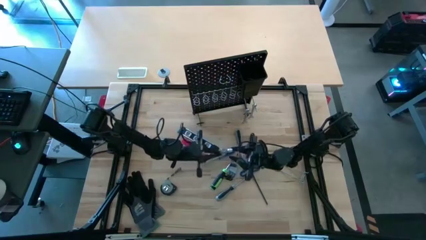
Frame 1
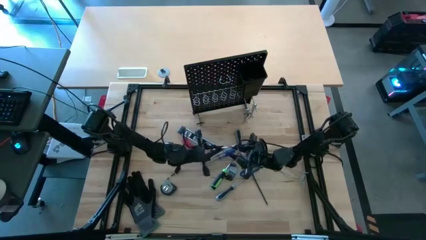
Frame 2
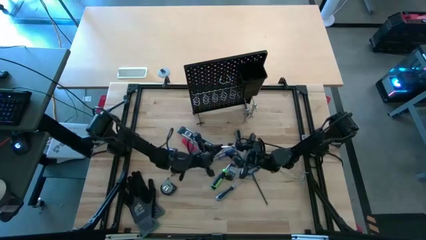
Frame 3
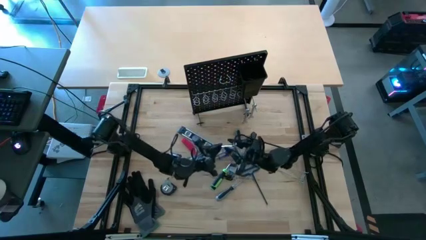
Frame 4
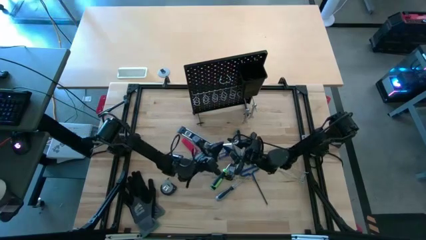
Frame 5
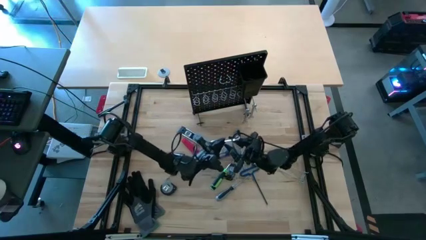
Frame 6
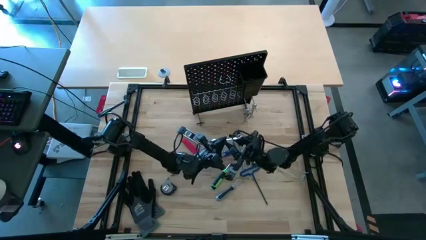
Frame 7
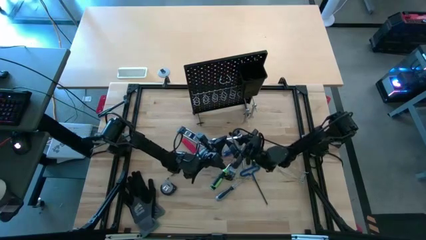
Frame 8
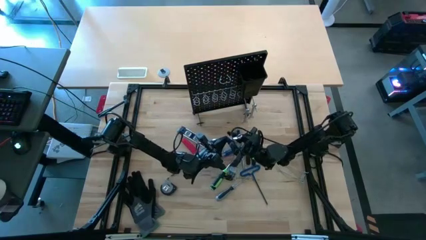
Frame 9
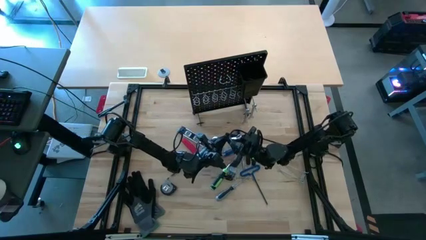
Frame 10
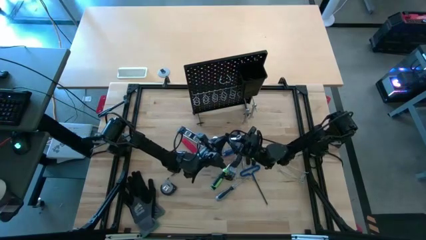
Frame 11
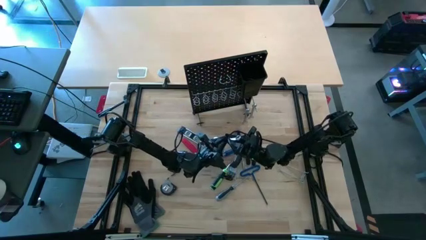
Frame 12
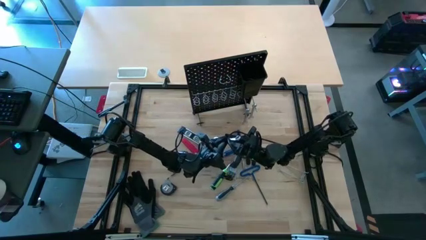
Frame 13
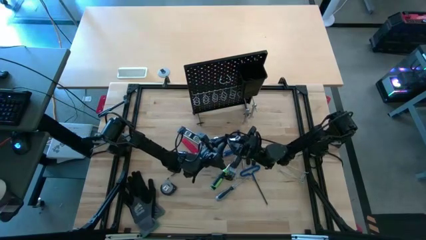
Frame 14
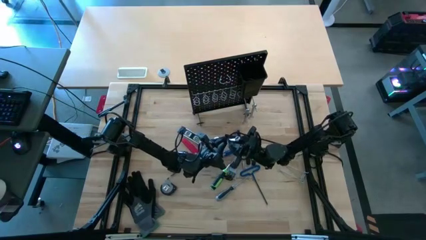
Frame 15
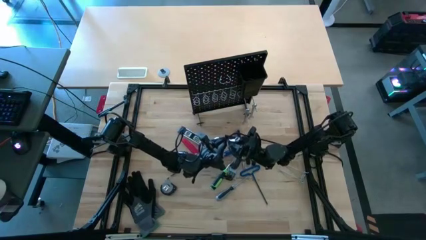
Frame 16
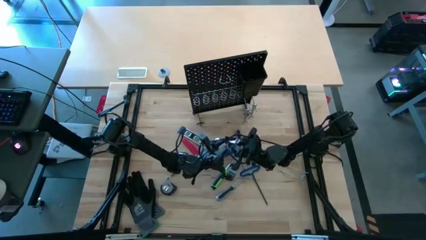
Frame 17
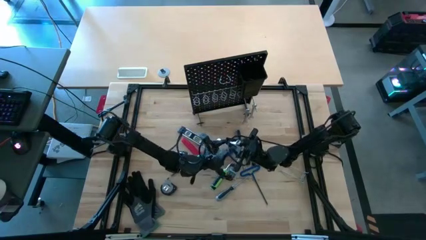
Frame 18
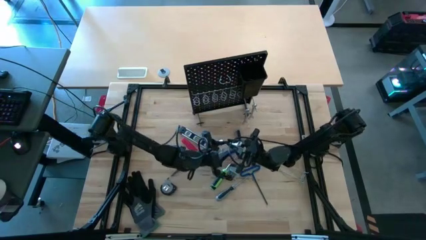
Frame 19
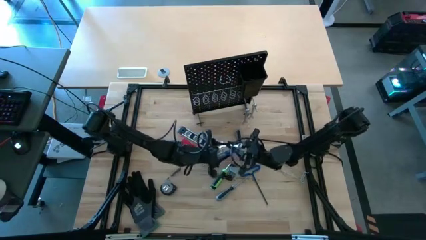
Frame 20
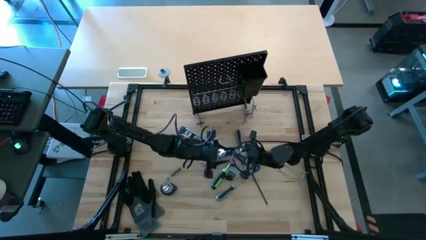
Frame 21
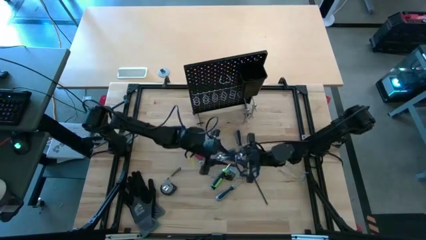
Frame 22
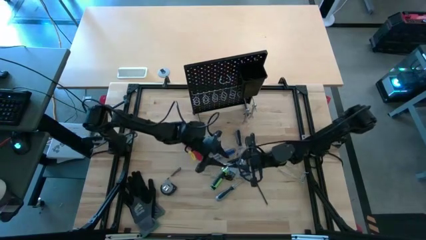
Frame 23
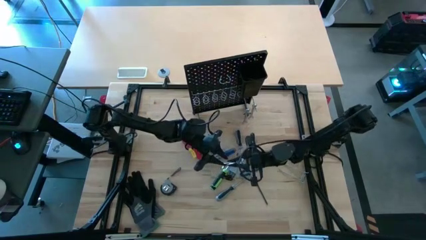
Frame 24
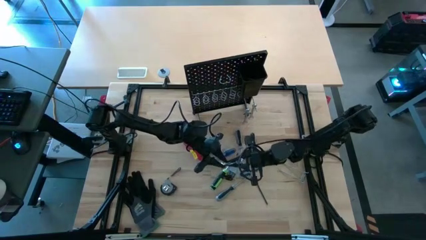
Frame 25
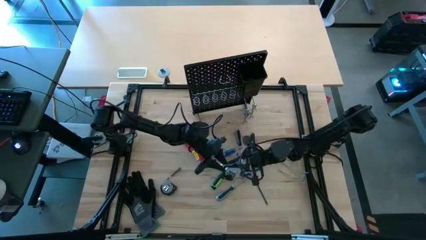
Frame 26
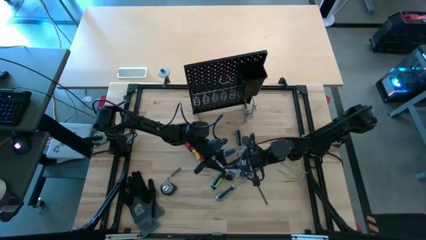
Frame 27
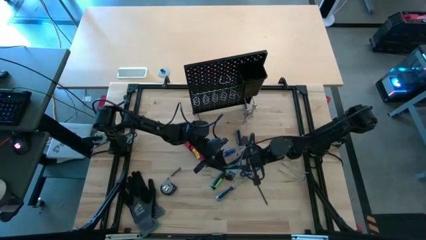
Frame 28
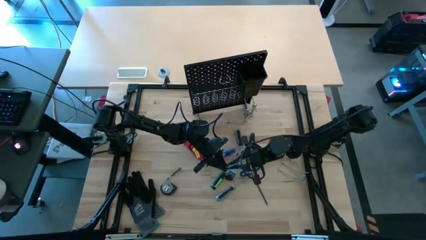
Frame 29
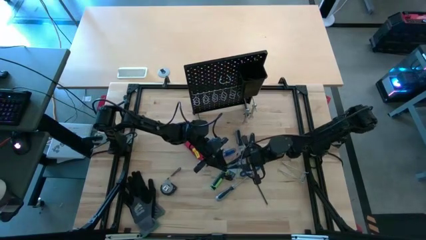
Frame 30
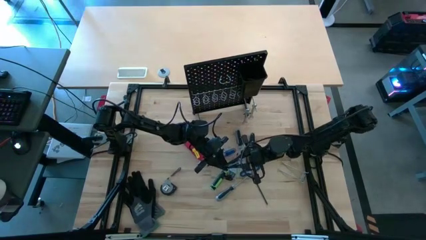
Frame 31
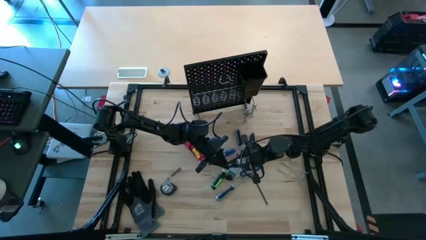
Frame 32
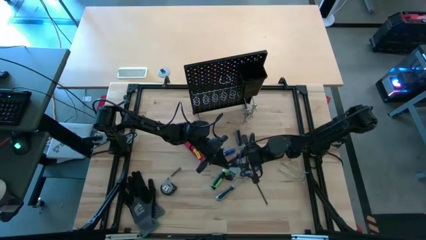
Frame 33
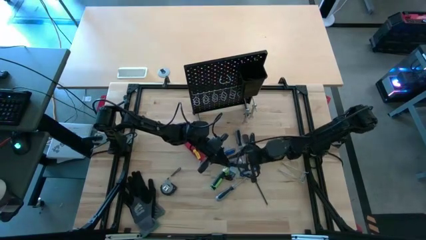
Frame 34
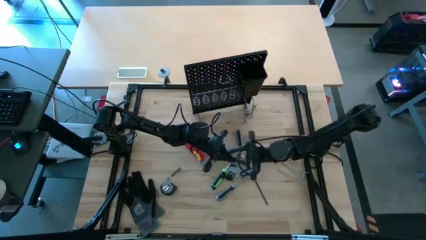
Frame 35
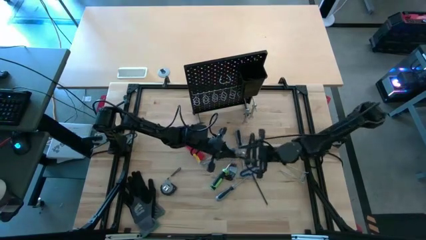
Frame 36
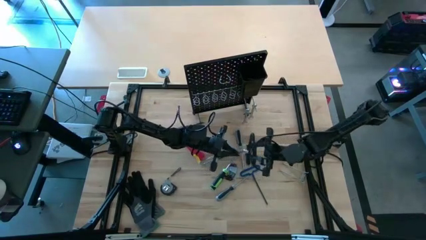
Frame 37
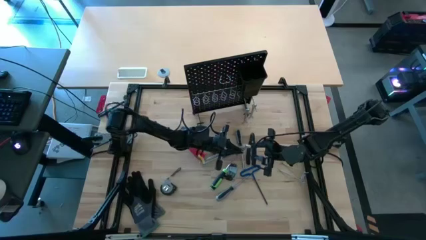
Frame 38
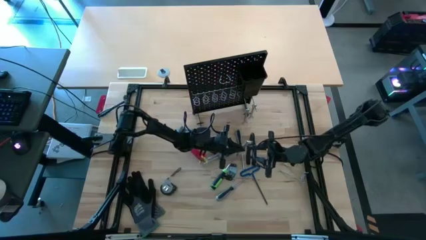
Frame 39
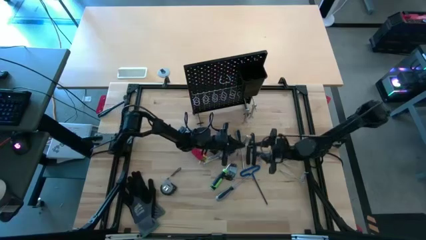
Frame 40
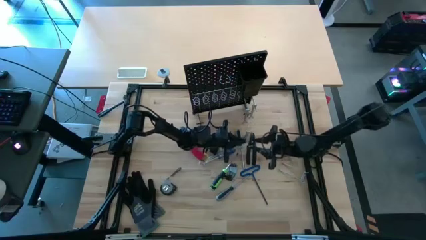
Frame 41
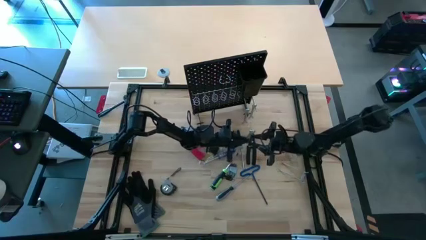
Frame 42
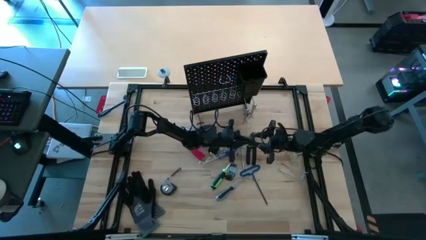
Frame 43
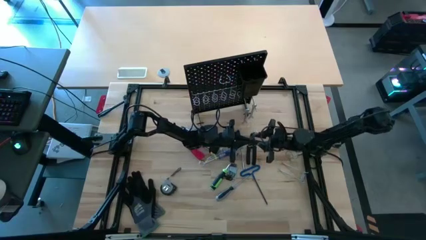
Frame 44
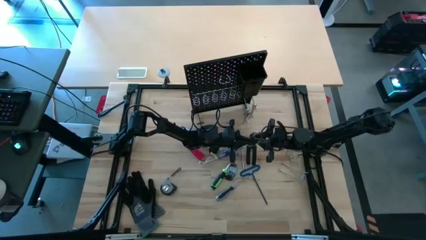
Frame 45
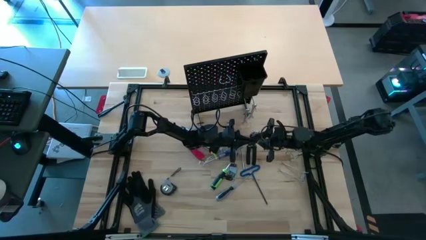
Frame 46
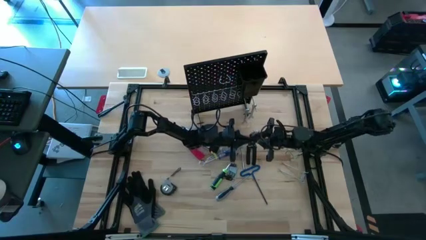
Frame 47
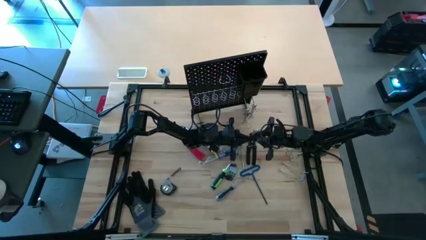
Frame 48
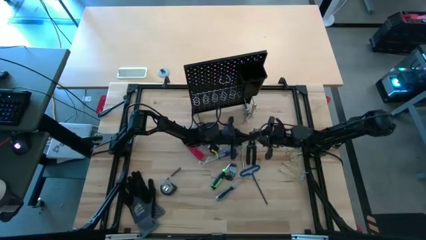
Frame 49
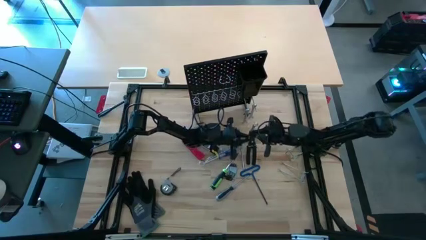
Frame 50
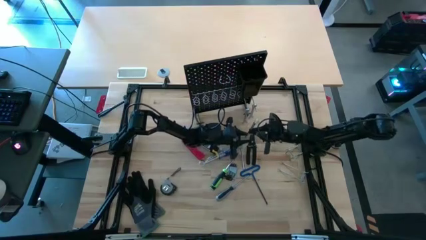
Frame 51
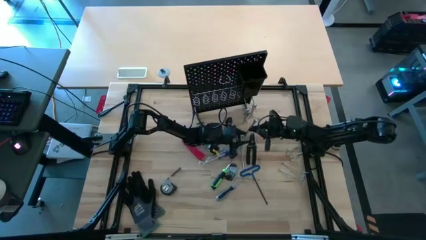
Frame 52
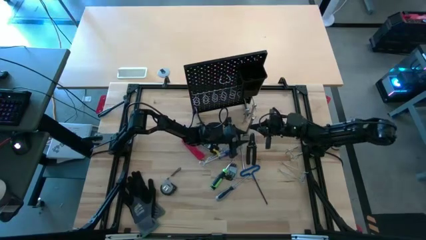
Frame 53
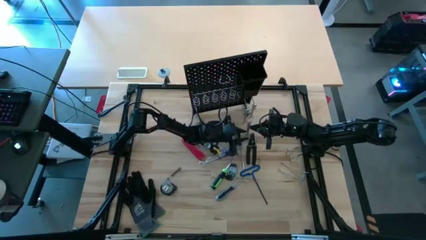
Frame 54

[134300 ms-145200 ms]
Task: Hang tools onto peg board
Hang the left wrench onto the pegboard

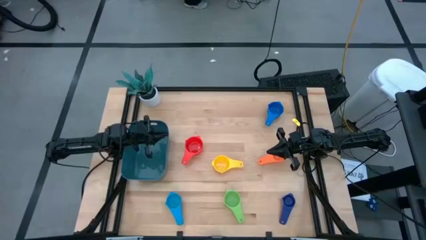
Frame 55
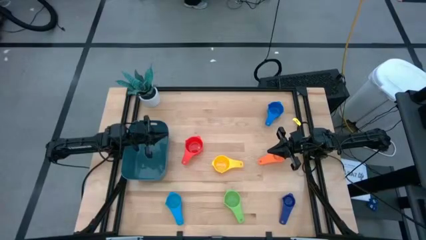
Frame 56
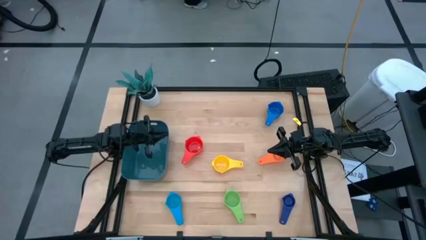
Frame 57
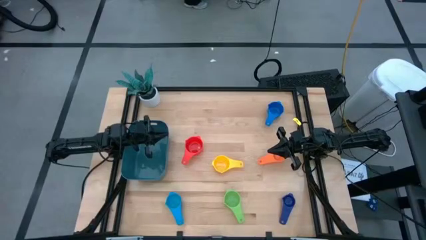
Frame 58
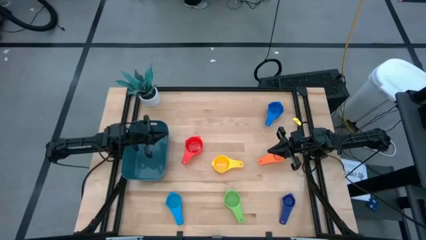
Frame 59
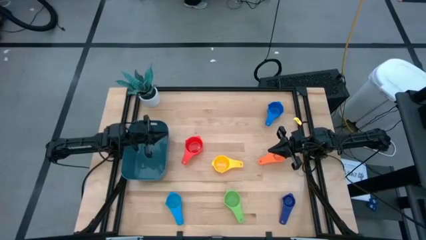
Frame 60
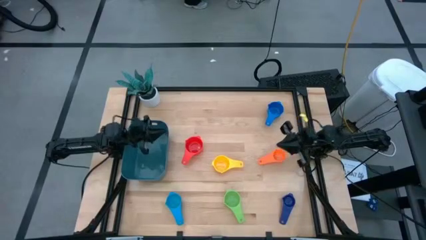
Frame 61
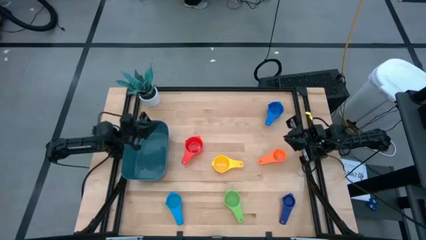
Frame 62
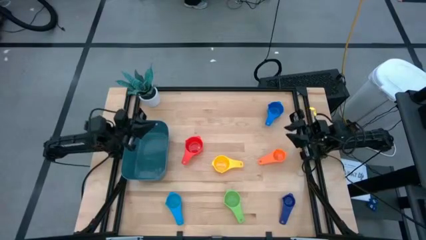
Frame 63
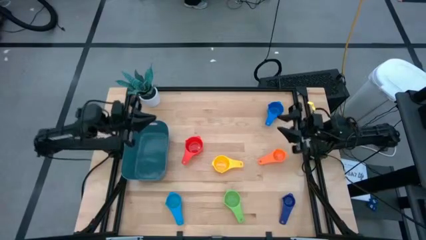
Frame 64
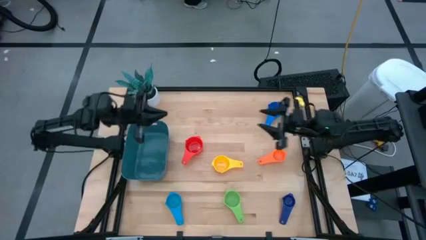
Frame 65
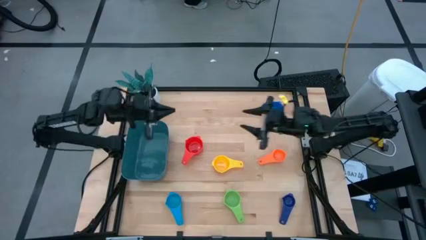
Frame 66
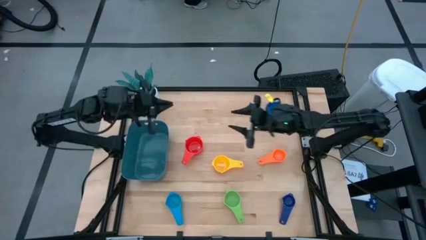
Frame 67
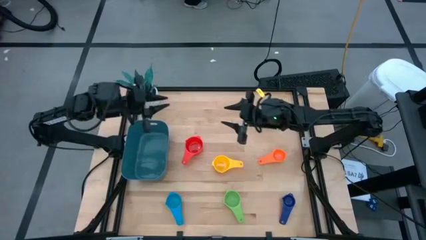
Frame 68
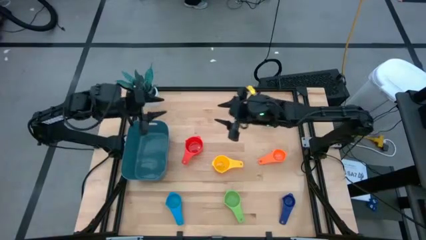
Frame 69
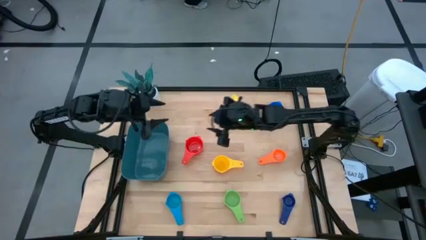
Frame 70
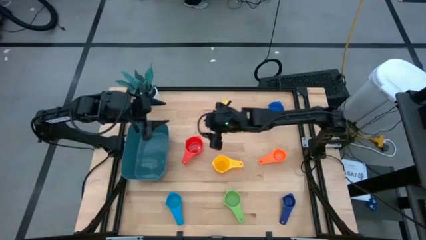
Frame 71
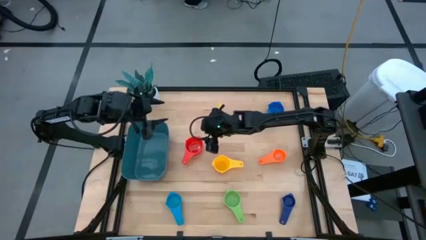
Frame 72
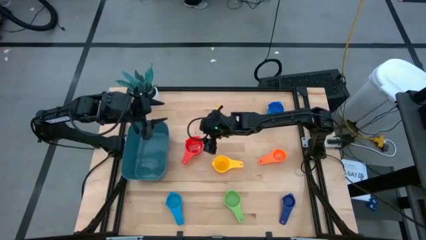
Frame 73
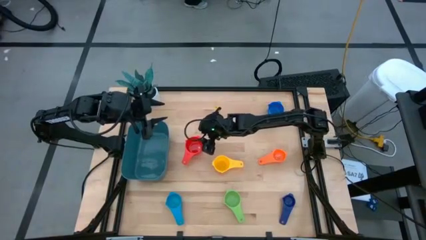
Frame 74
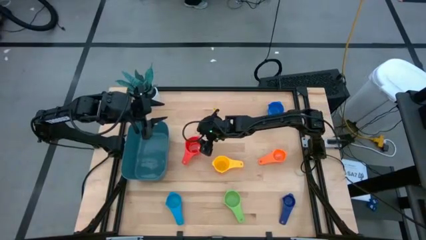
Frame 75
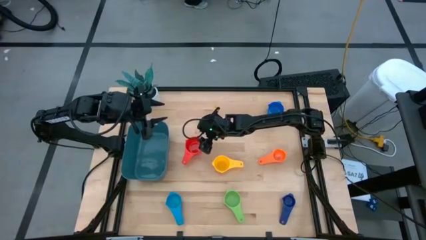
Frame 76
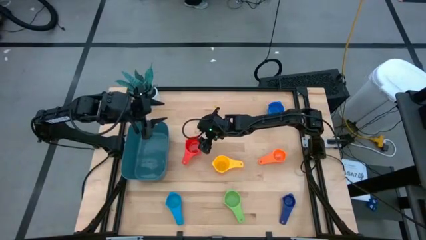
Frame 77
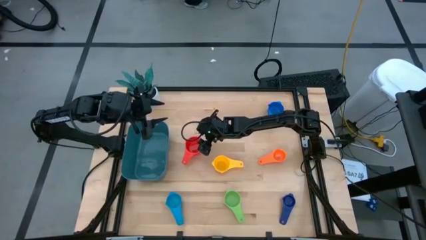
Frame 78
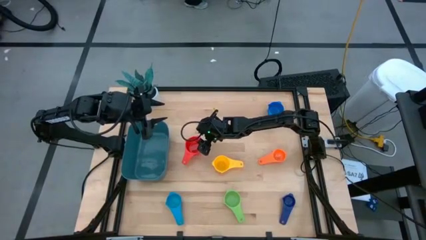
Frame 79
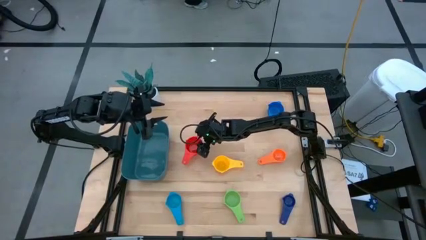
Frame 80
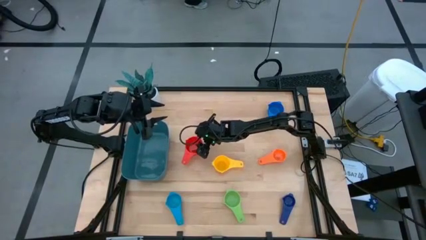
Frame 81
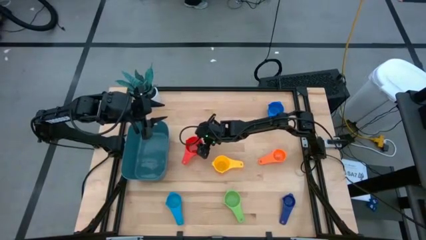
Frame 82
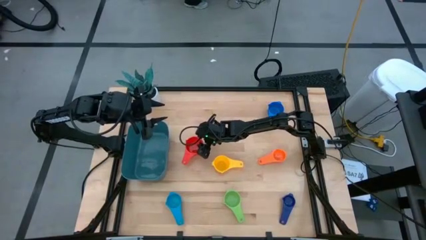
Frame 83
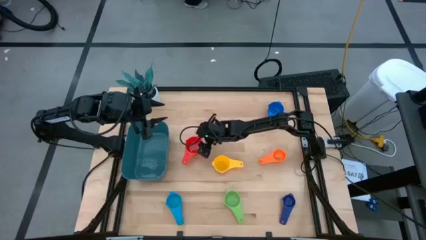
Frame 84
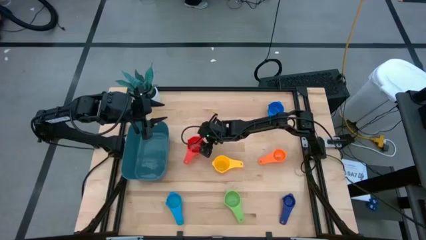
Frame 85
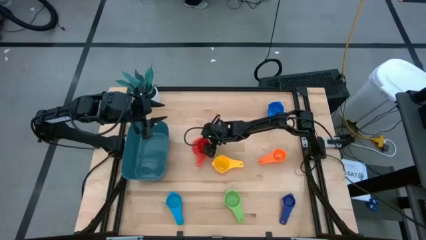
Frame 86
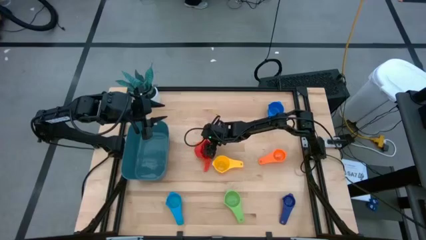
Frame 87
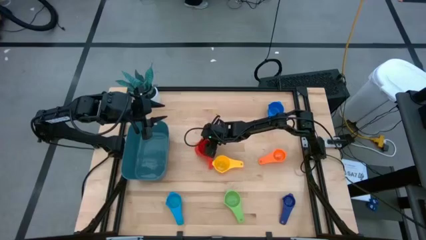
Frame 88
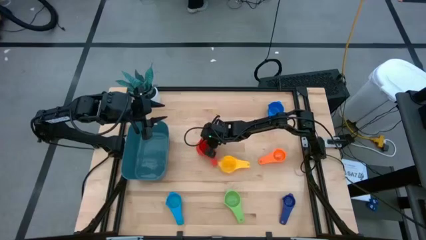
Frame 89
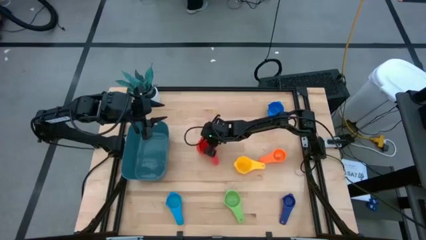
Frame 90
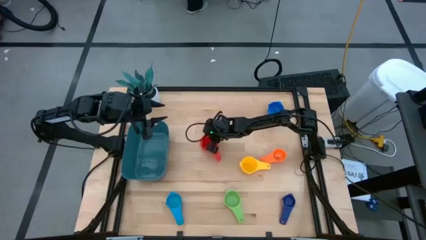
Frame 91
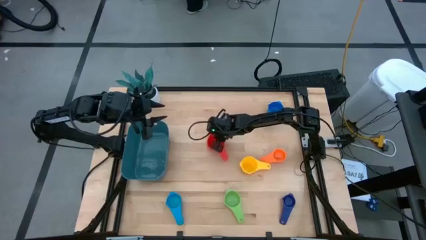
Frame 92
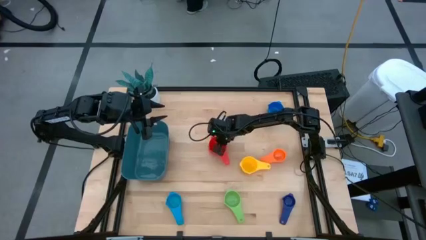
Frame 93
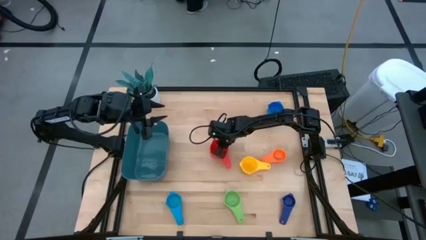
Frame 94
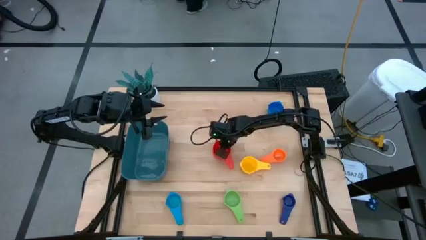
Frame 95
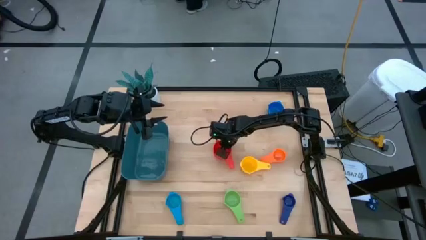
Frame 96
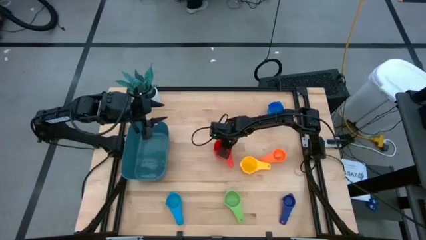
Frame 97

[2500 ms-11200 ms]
Task: Nest measuring cups in basket
Move the red measuring cup to the center of the table
